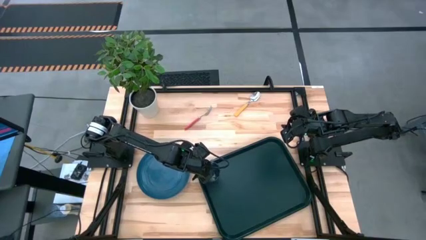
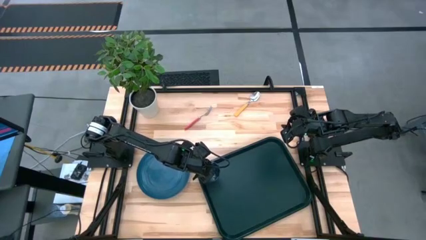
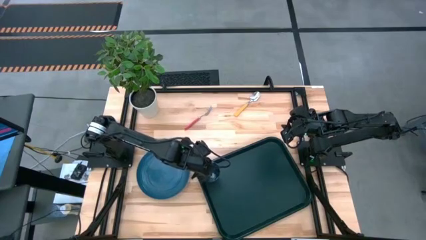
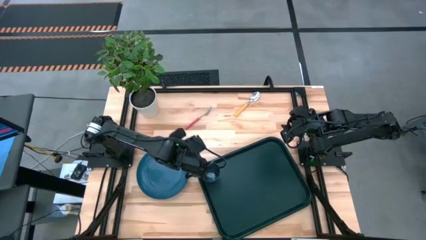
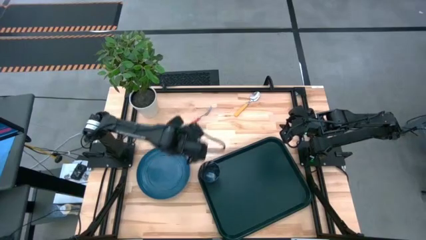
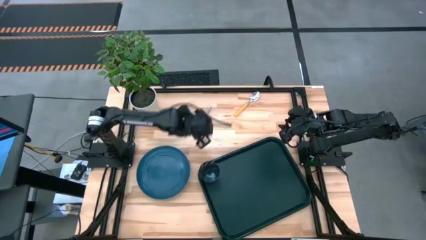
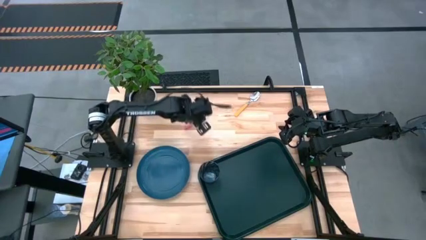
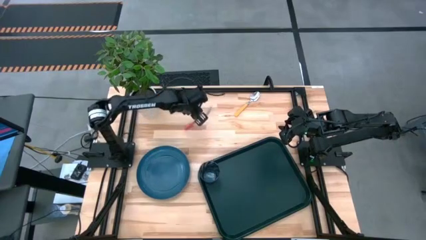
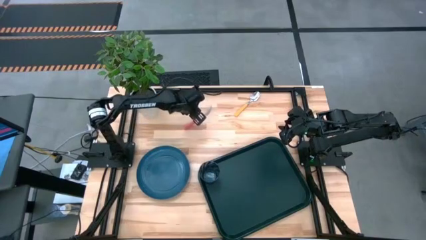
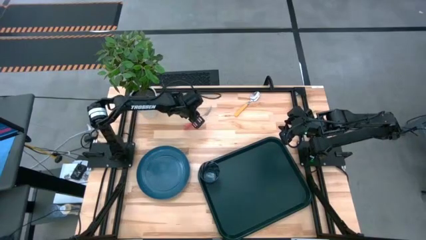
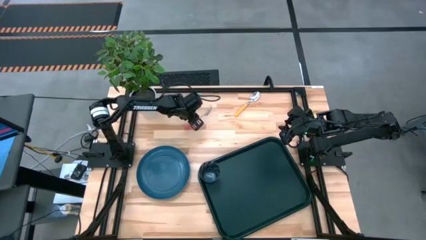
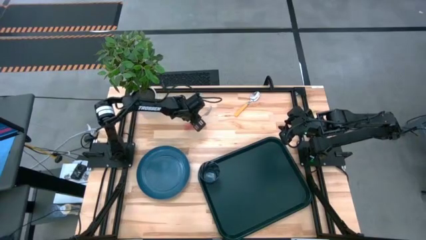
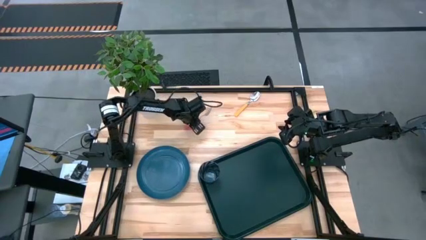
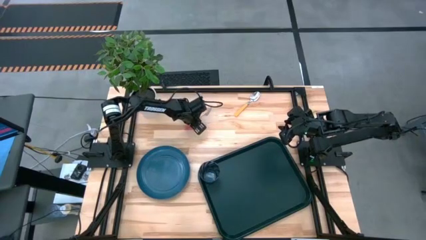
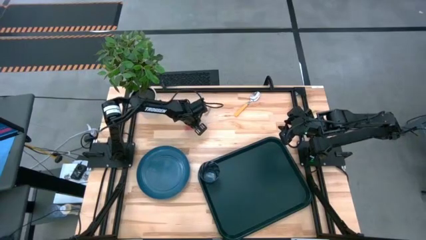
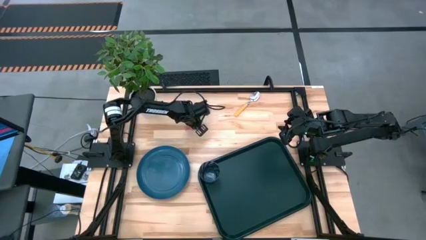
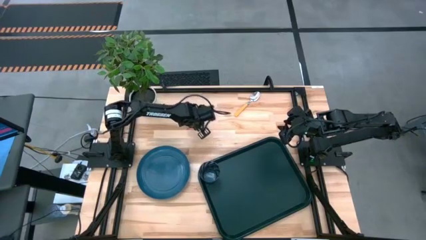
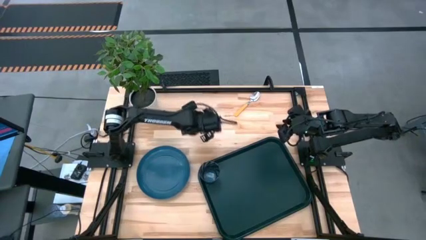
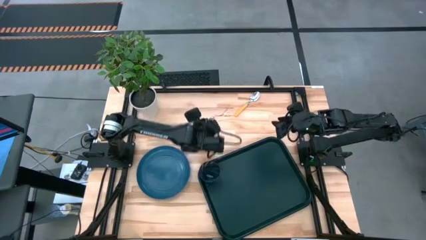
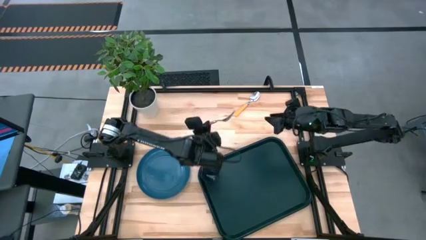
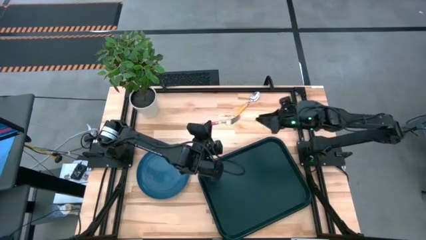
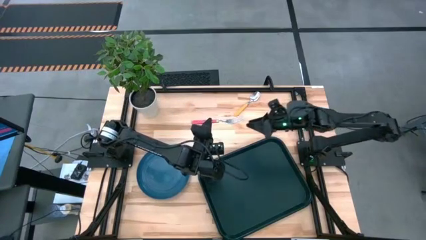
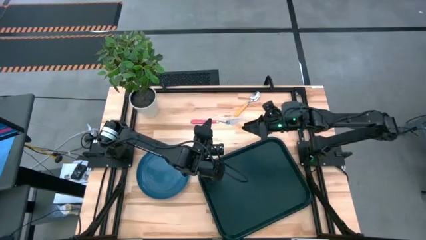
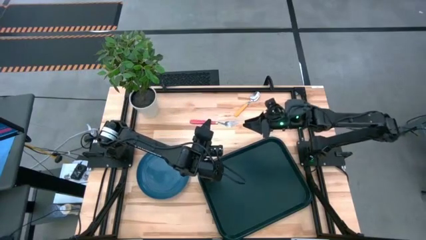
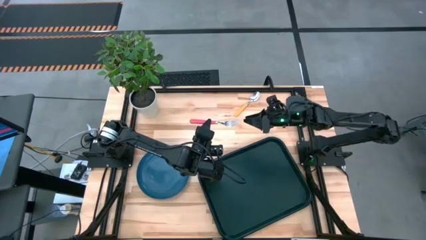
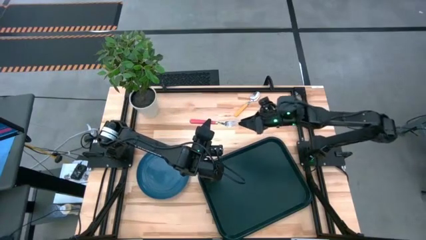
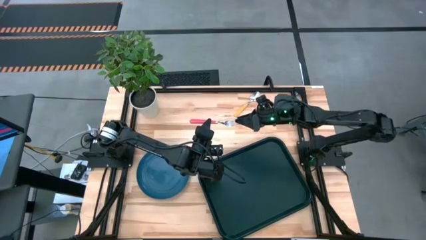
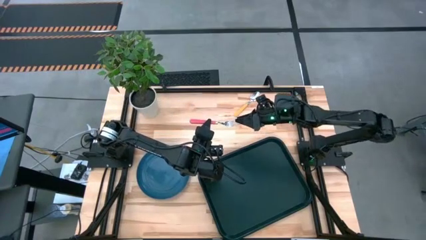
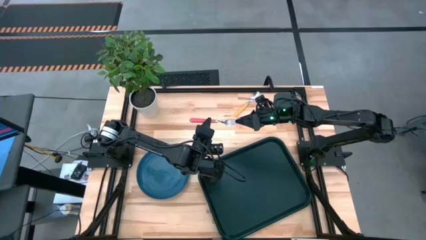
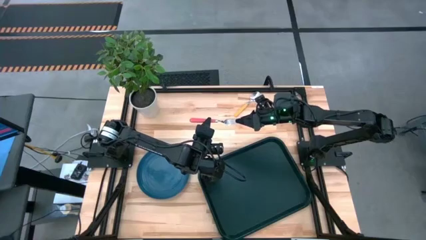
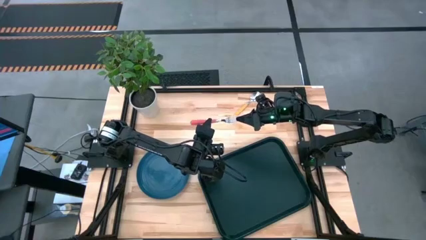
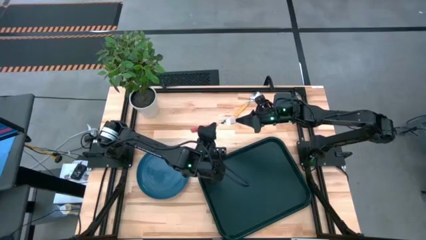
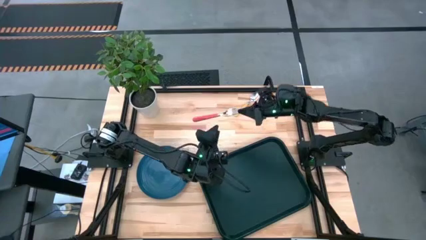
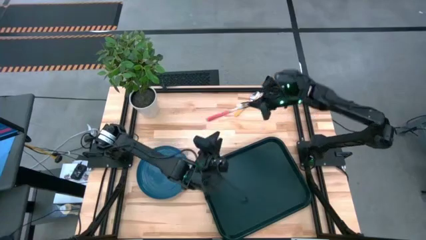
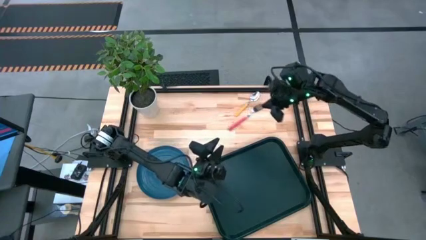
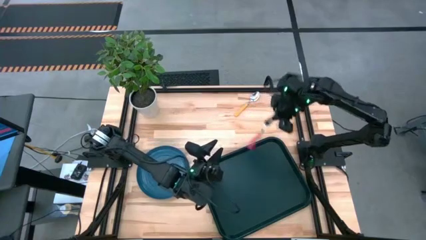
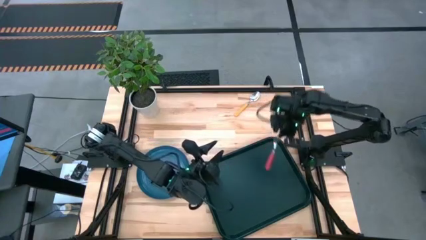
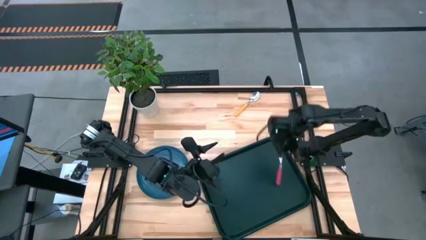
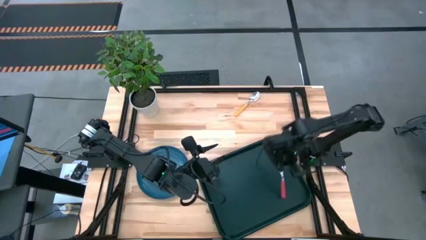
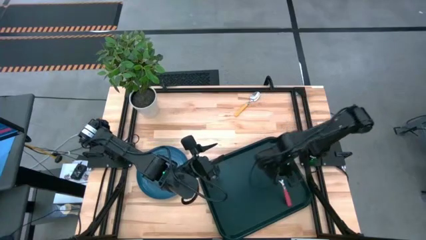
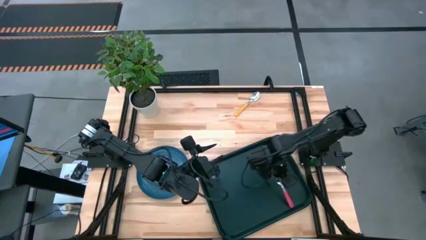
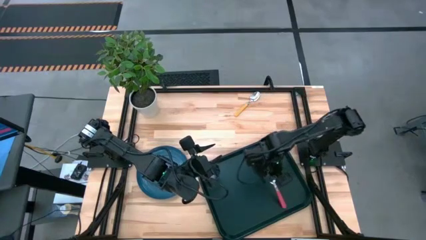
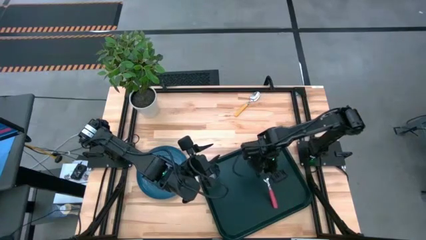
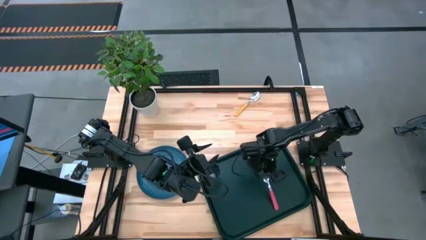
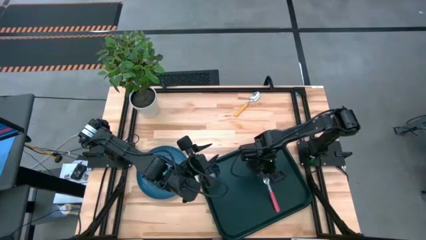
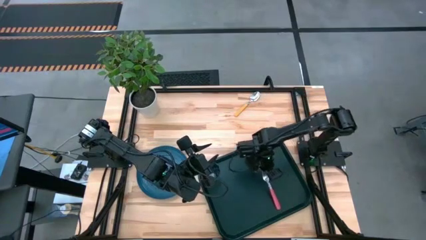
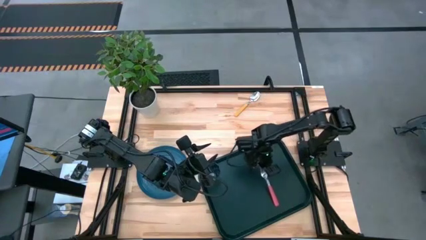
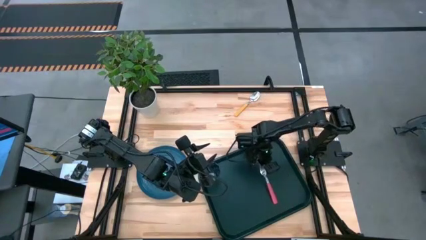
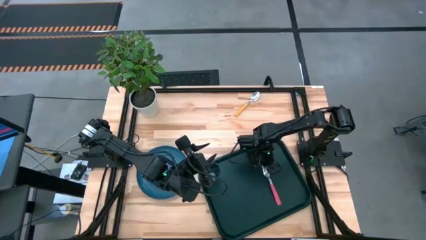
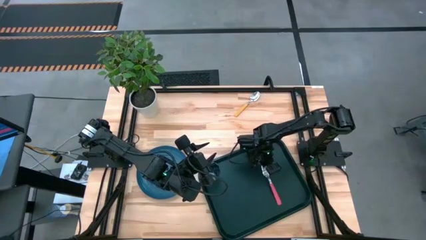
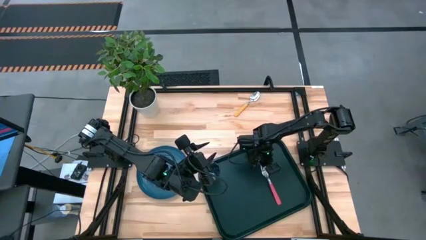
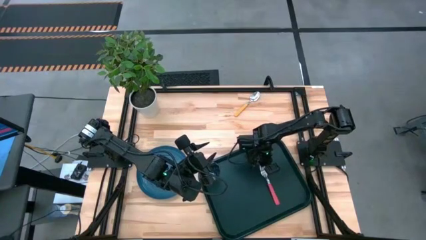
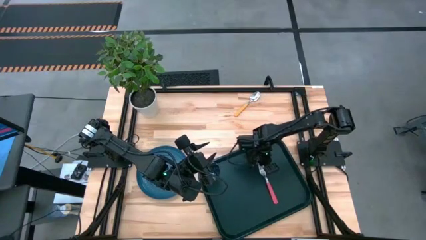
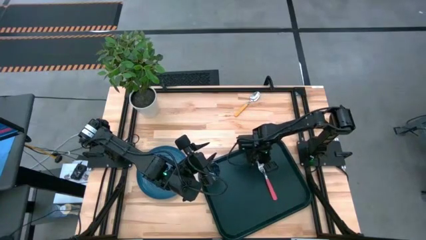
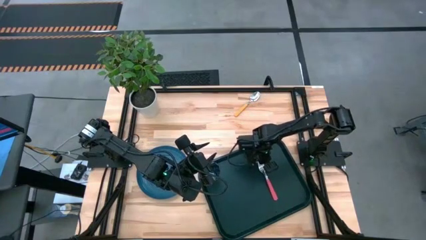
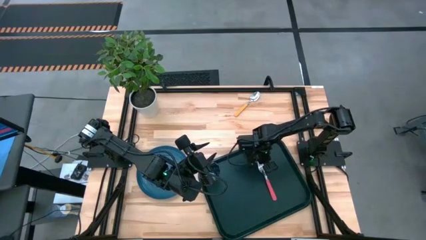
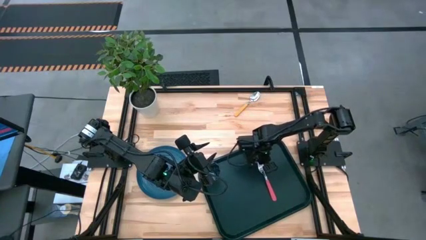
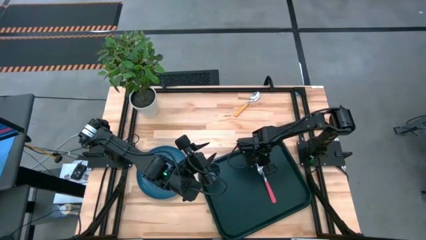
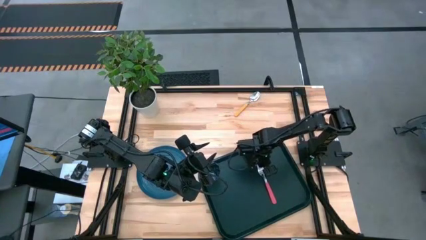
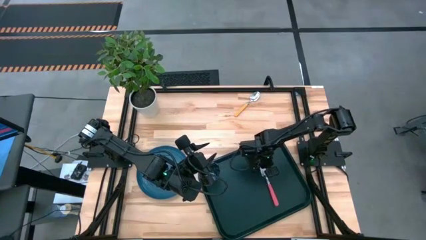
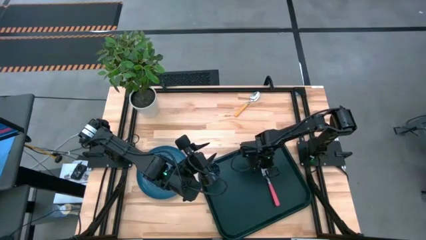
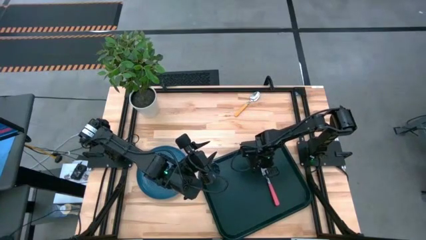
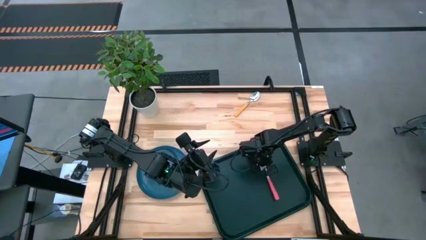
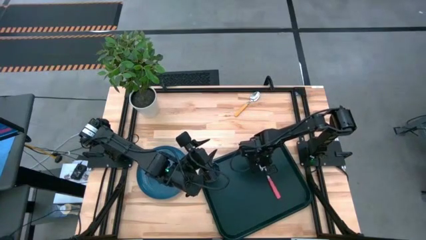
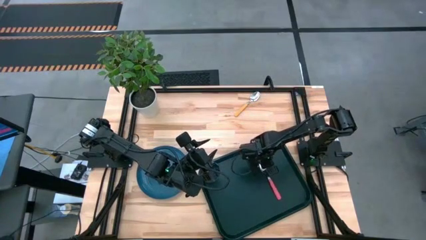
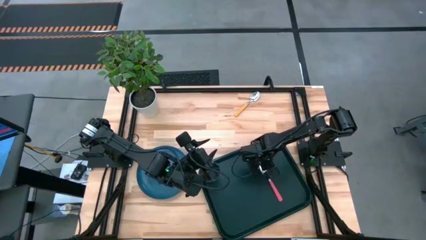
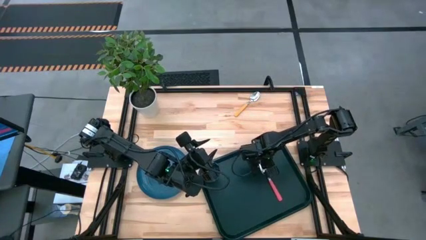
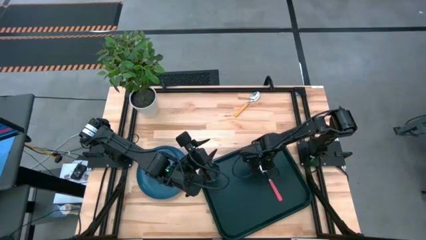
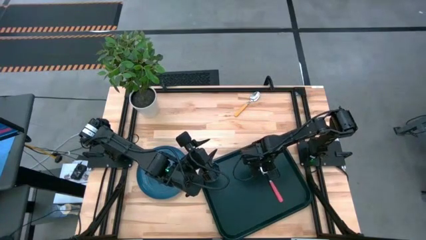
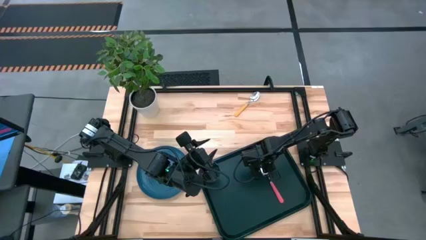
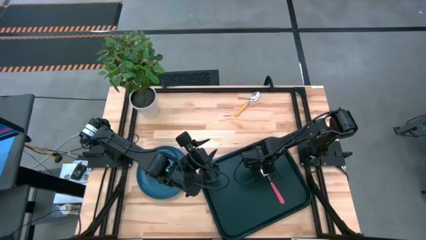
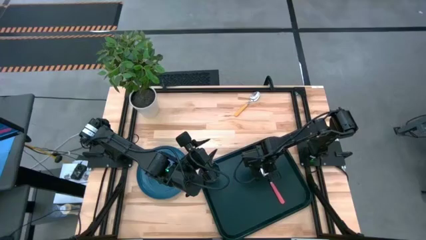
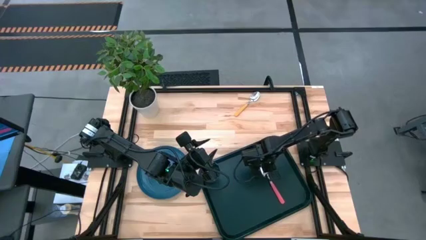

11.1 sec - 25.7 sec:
Task: Pick and place plate/cup/fork/spoon on tray
Put the pink fork on the middle of the black tray
